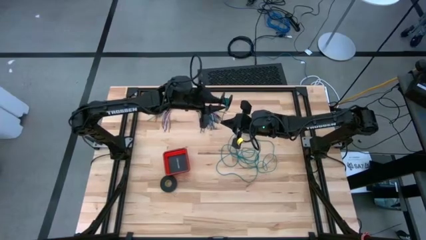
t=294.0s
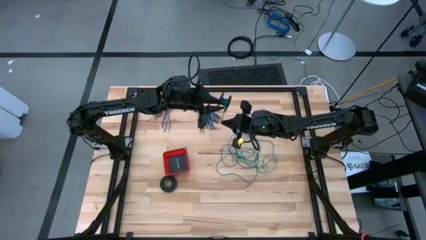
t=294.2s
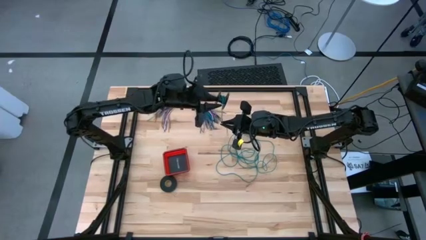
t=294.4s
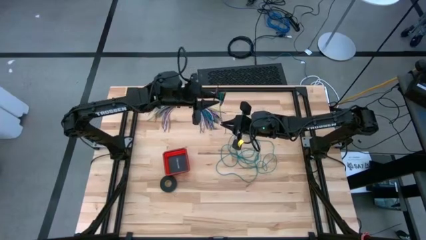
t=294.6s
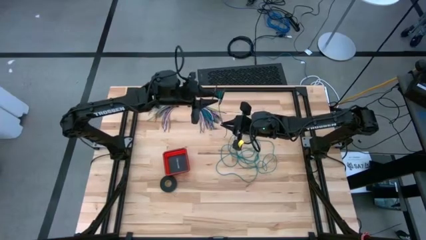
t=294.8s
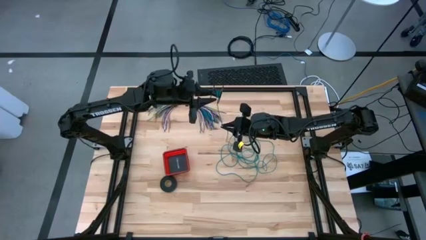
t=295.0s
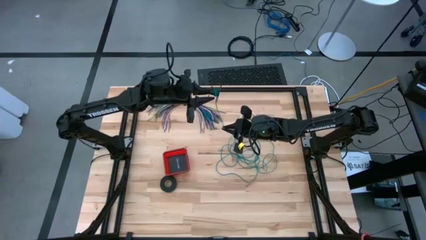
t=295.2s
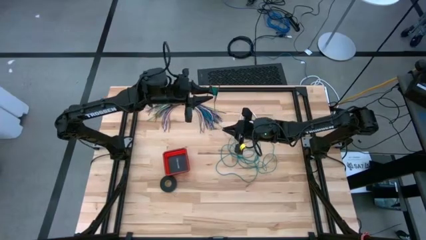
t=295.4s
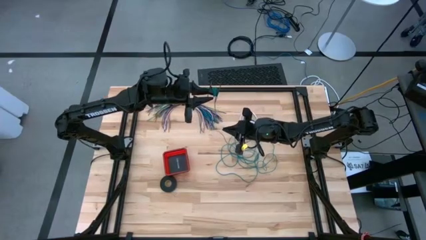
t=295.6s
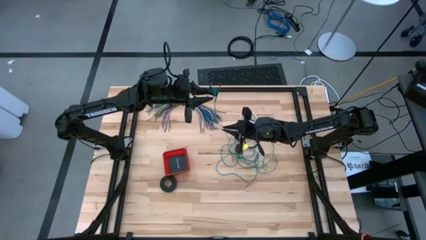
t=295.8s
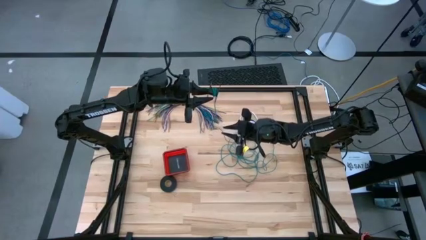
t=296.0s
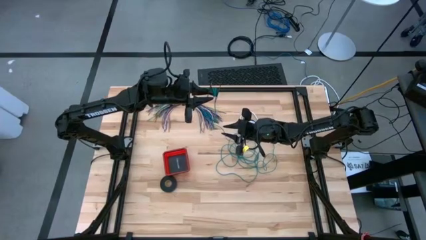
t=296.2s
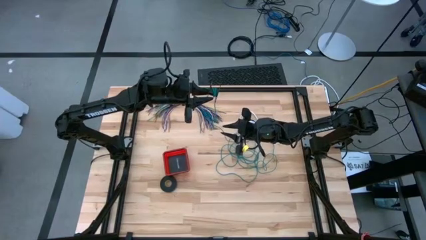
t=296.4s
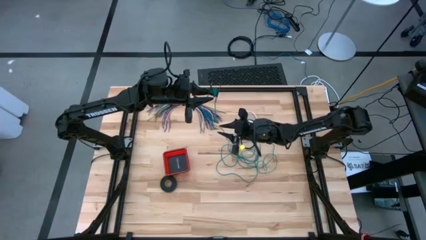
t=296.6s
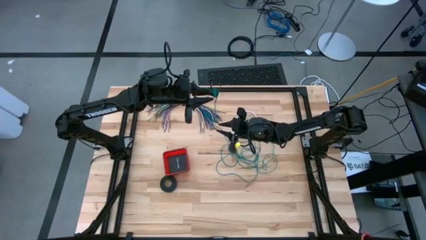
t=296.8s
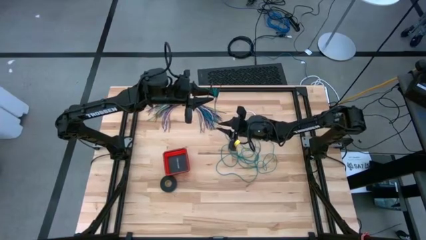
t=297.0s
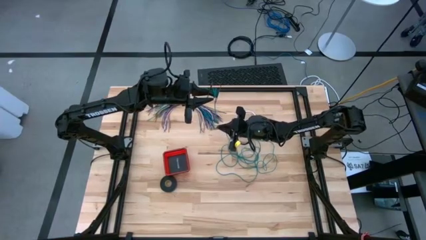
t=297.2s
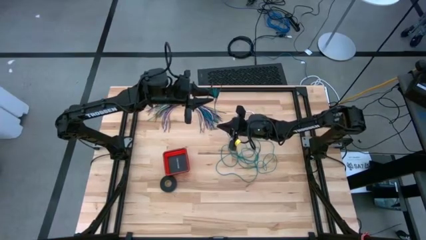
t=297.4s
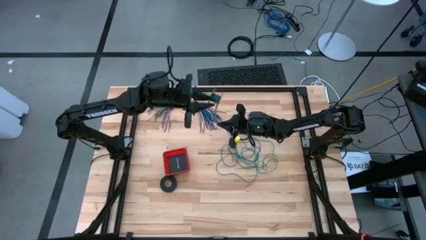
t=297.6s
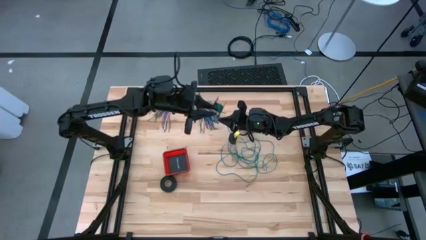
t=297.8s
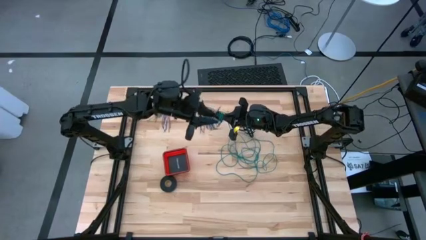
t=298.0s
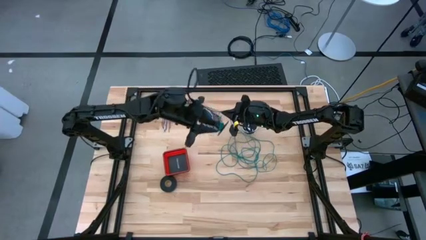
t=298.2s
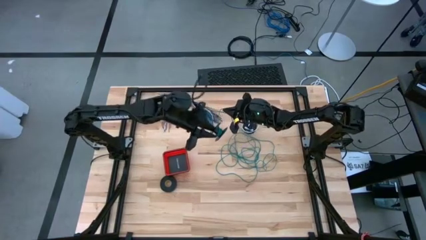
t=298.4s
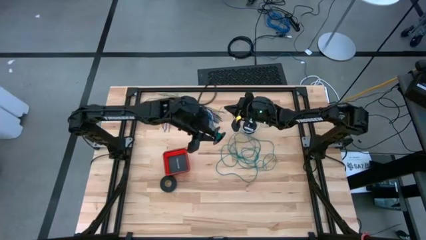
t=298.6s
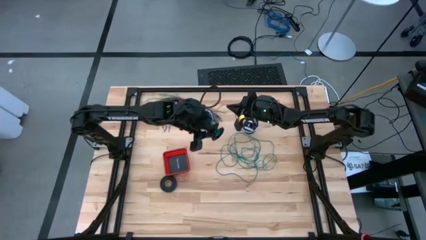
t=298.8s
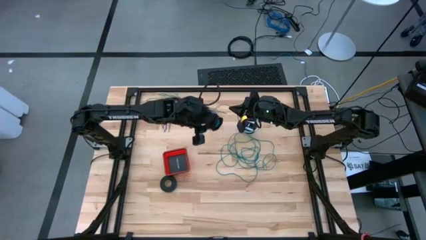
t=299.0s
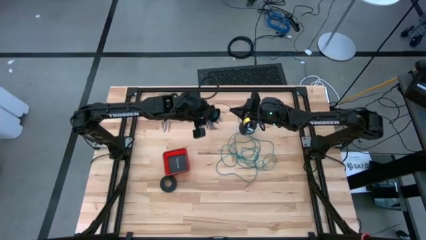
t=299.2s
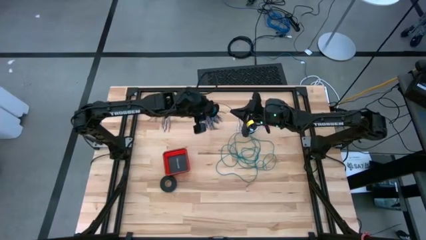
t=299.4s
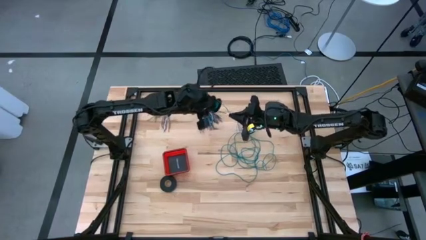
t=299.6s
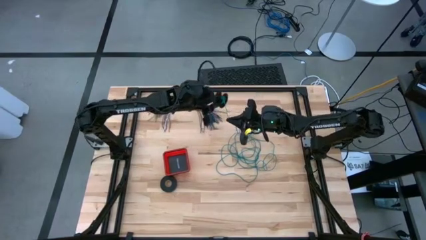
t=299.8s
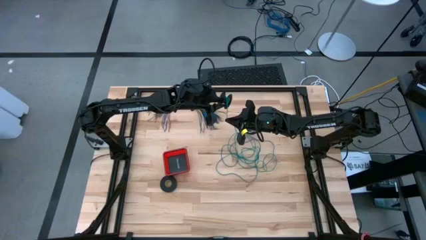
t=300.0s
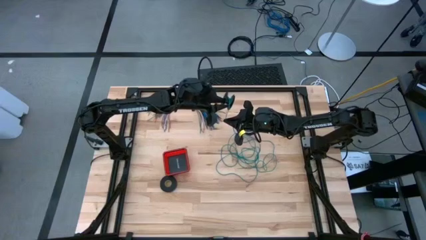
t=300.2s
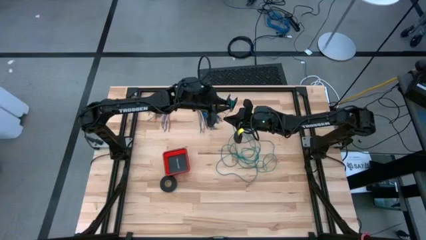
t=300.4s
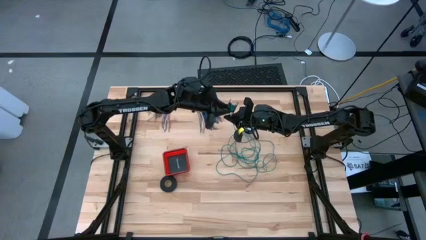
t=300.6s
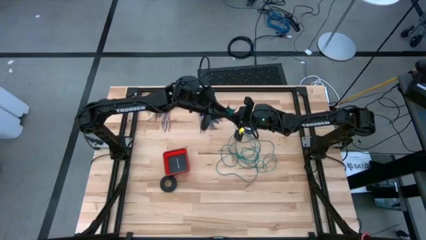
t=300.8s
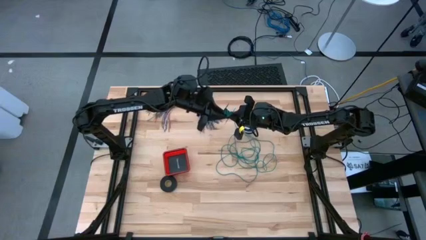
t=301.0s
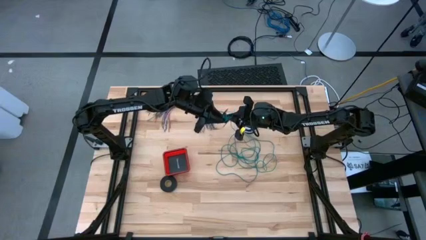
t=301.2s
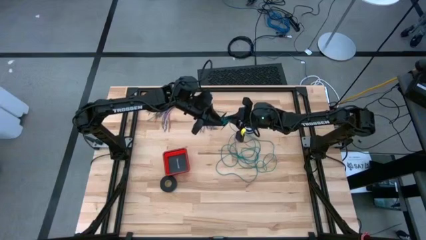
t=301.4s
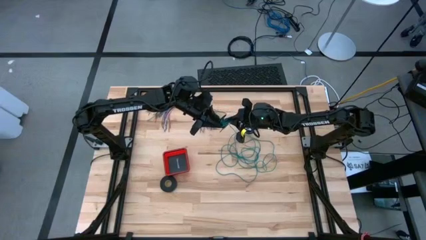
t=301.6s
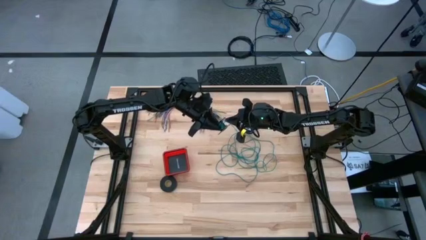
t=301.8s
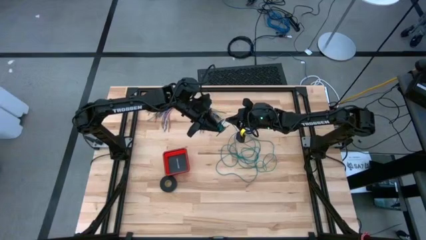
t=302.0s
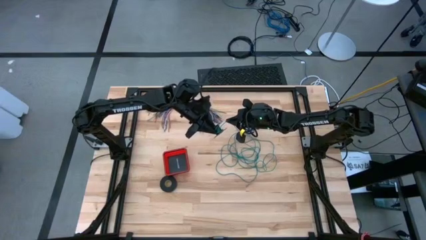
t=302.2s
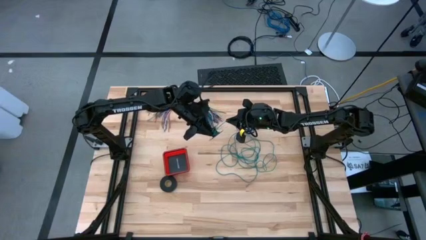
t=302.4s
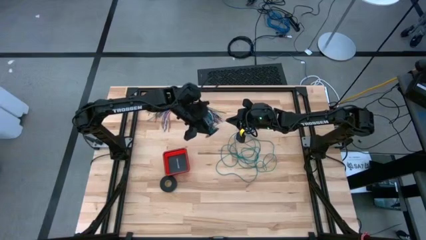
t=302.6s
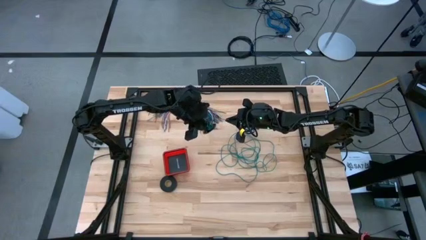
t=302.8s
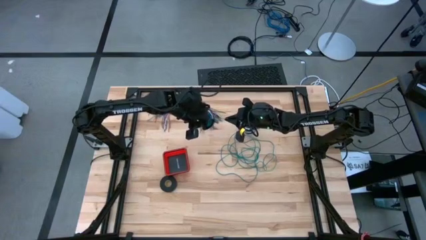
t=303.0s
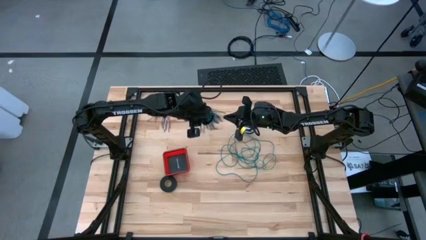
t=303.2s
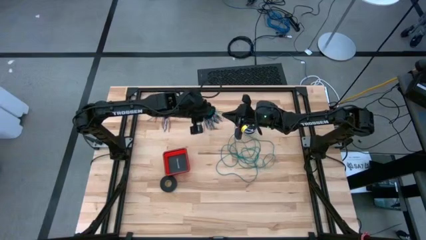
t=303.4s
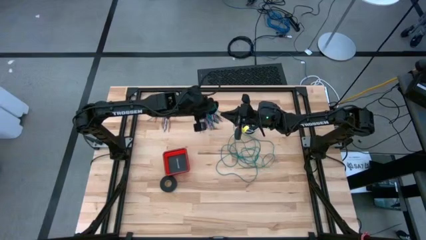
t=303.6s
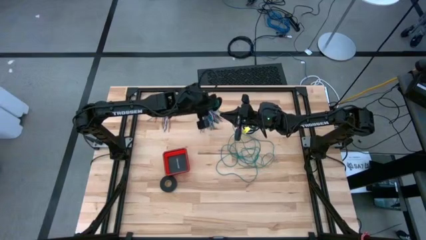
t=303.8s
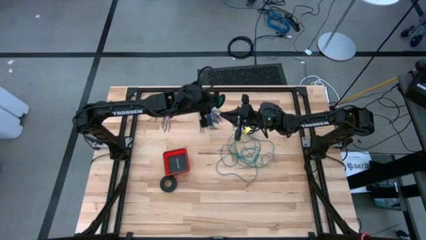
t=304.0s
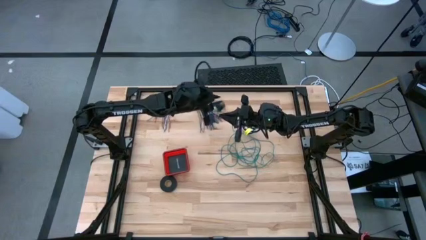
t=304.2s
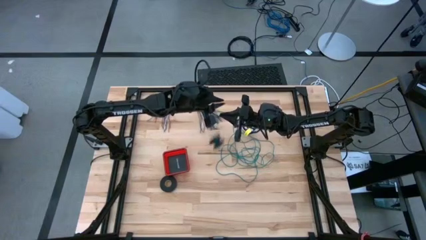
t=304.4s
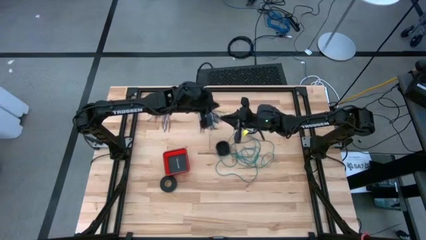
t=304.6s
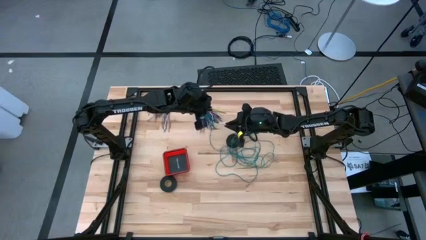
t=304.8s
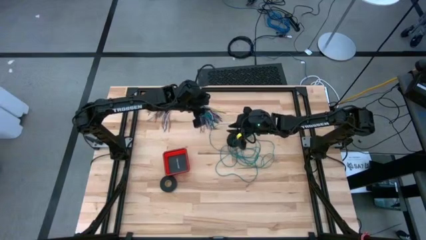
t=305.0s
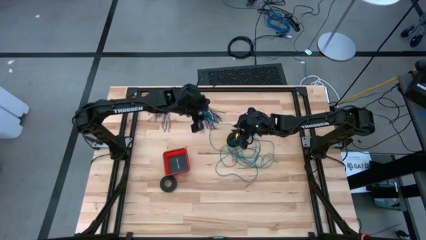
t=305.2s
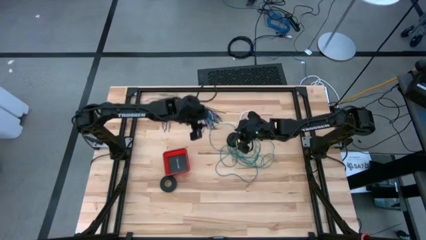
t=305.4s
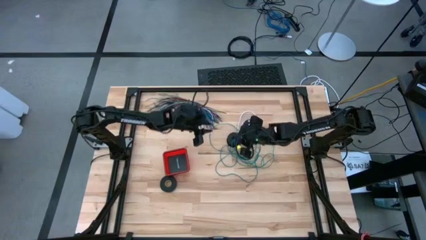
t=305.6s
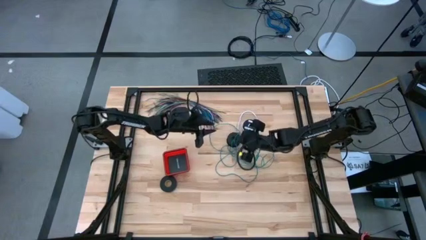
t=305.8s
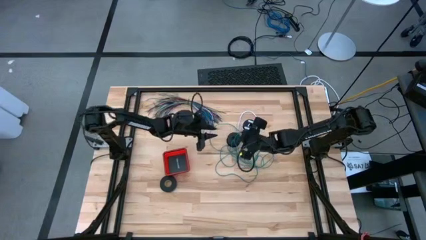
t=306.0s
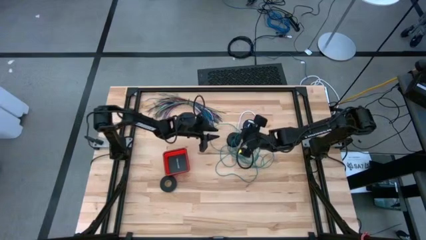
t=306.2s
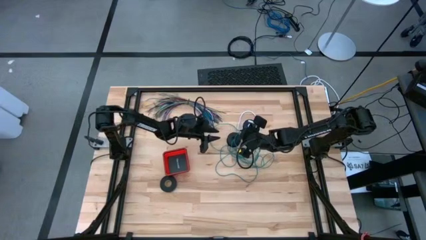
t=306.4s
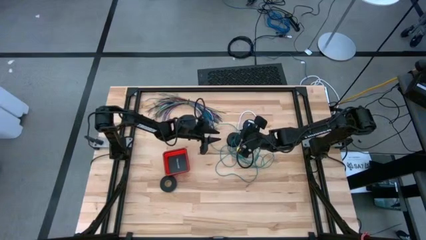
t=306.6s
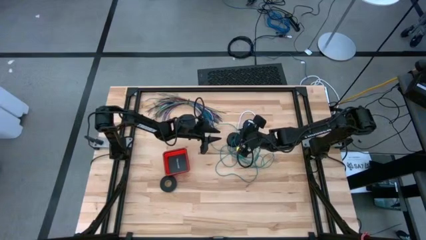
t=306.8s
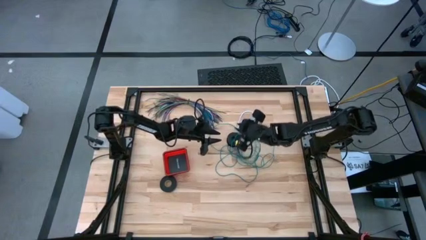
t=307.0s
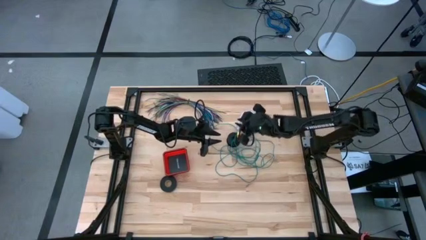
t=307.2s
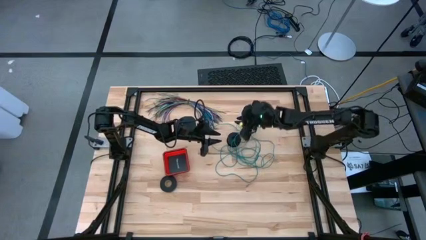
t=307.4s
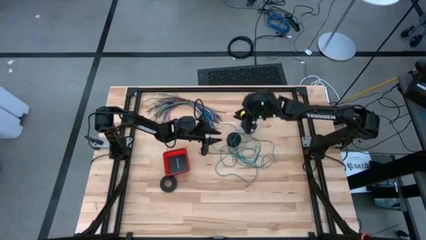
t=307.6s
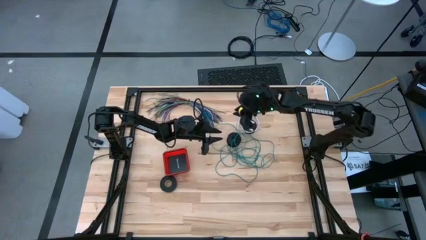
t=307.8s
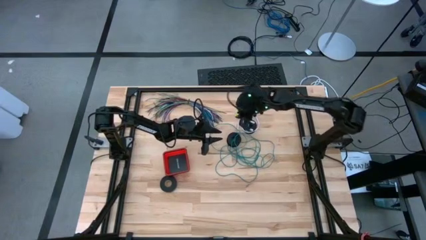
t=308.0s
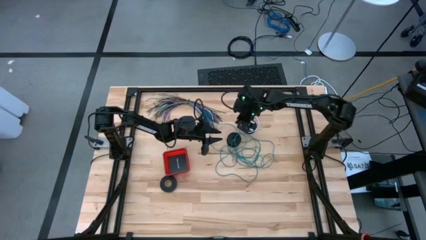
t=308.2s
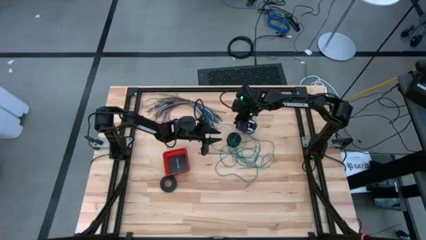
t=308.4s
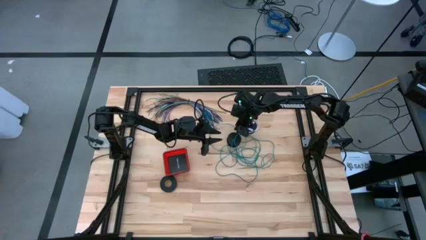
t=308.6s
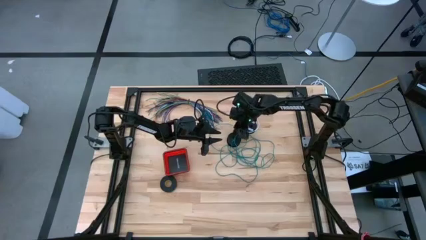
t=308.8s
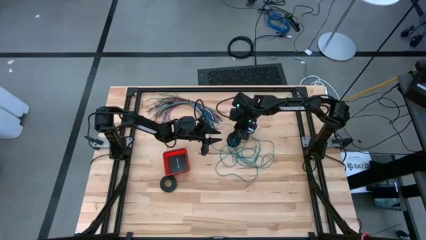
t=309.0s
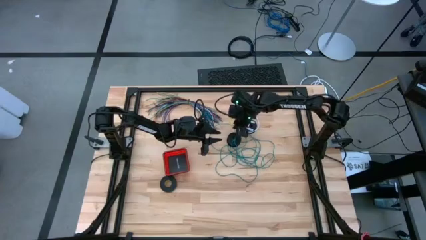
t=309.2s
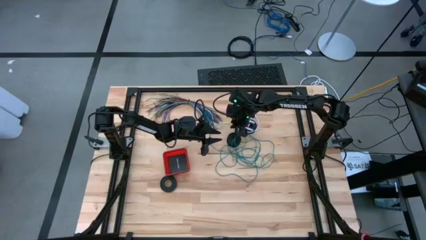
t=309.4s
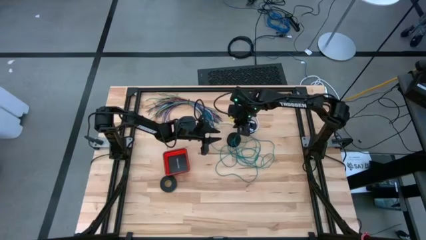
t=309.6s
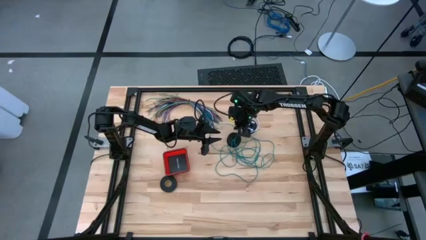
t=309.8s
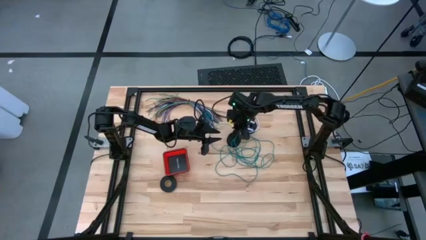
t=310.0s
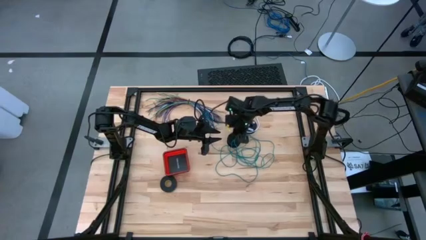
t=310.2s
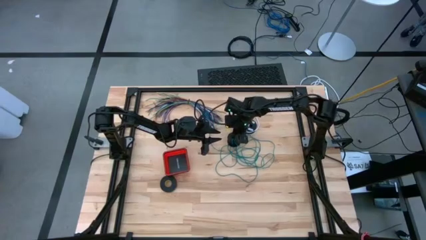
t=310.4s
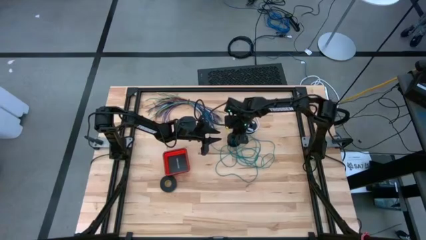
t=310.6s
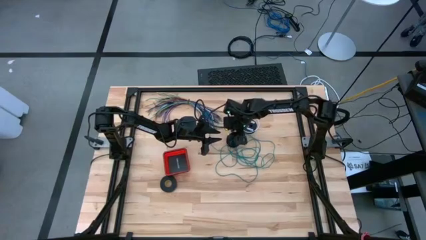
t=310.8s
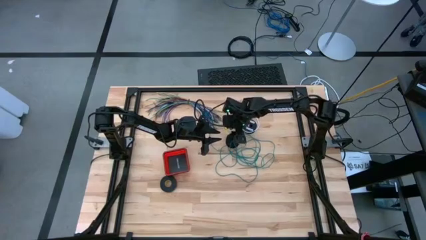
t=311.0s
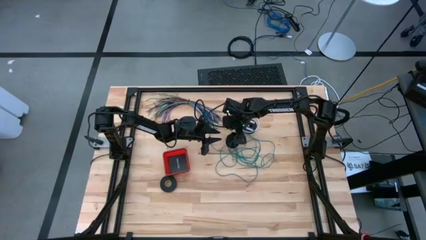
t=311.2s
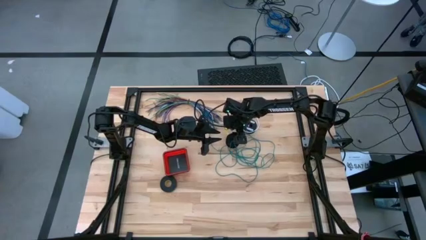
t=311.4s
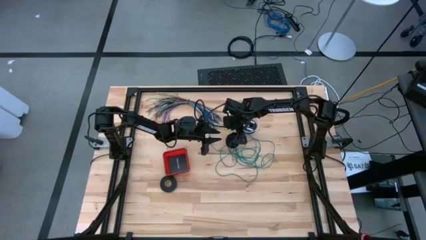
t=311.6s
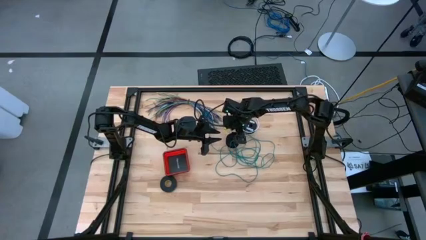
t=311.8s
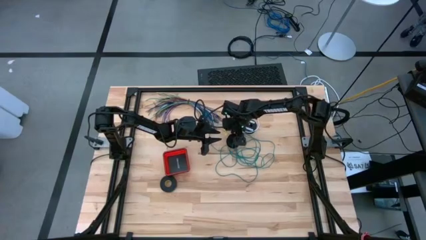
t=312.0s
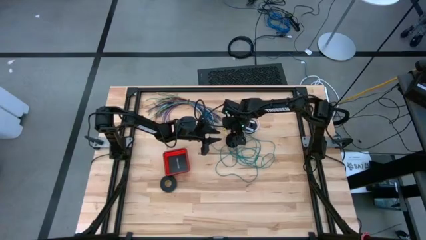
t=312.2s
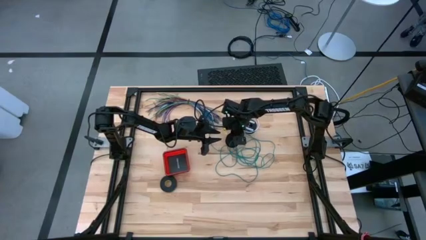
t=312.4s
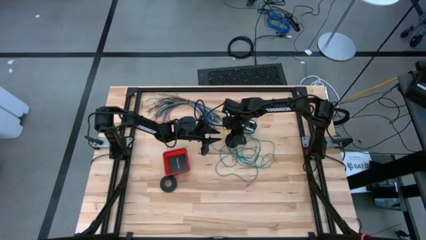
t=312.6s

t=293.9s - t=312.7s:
Task: Coil cords
Coil the green wire onto the spool
